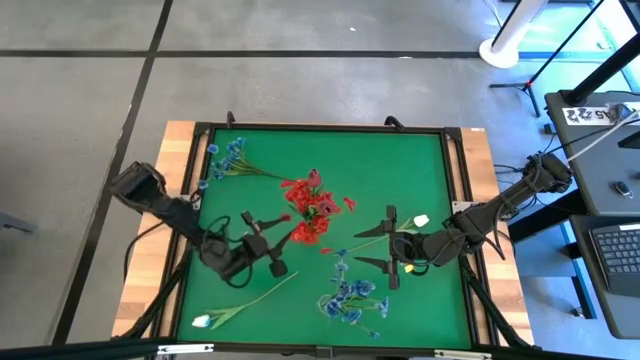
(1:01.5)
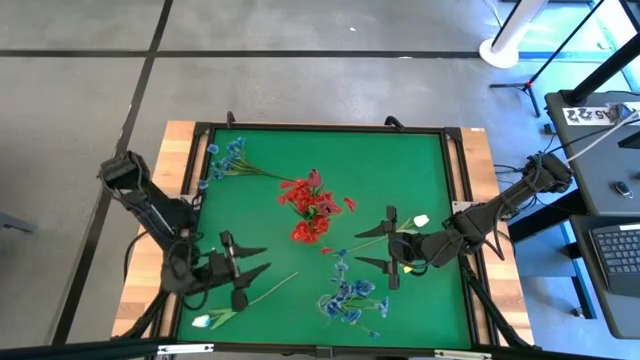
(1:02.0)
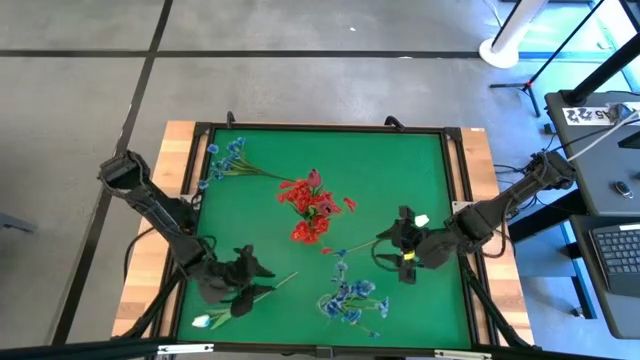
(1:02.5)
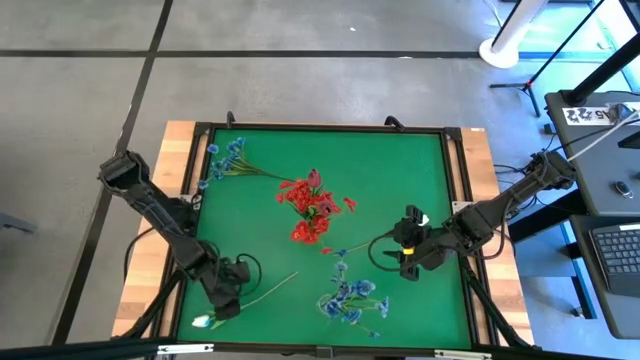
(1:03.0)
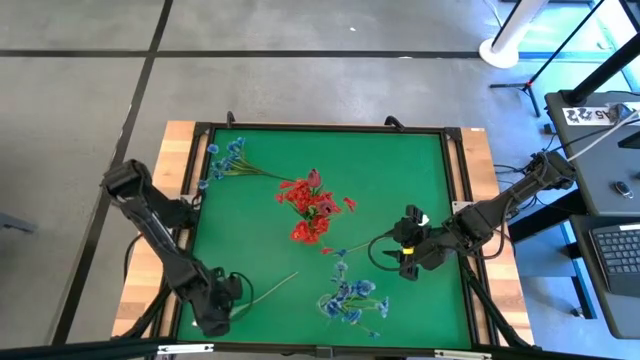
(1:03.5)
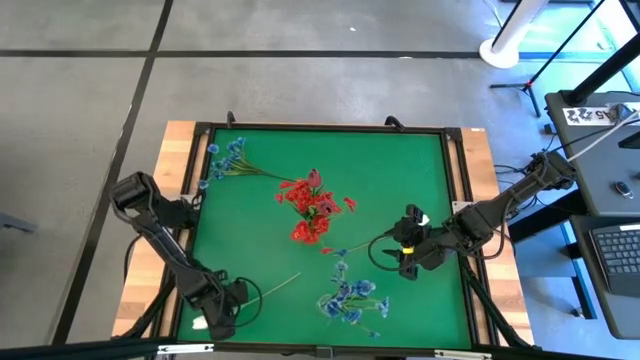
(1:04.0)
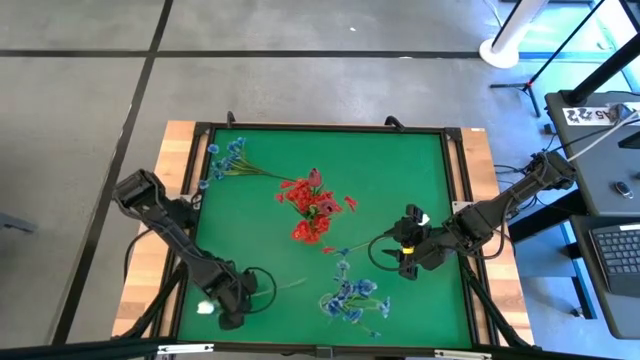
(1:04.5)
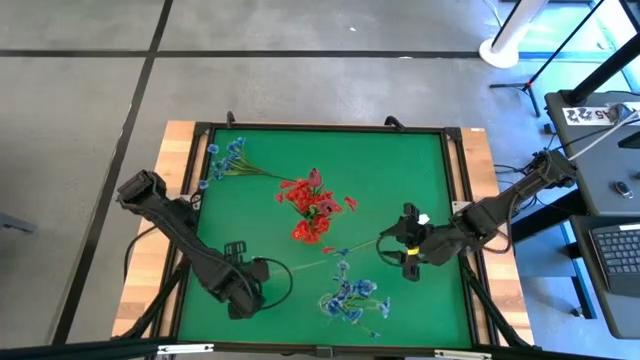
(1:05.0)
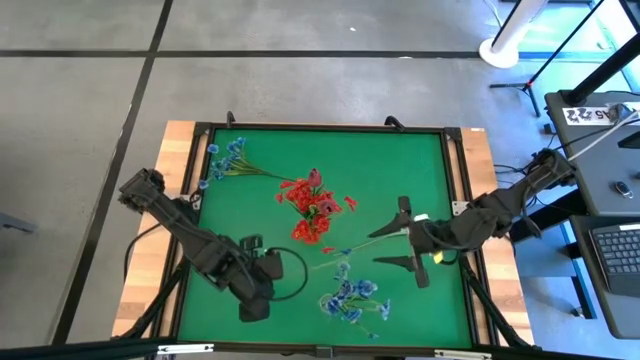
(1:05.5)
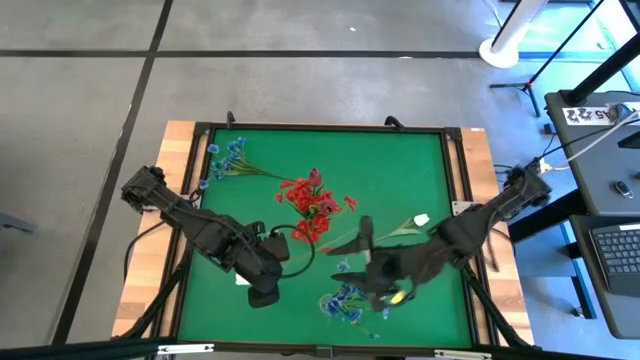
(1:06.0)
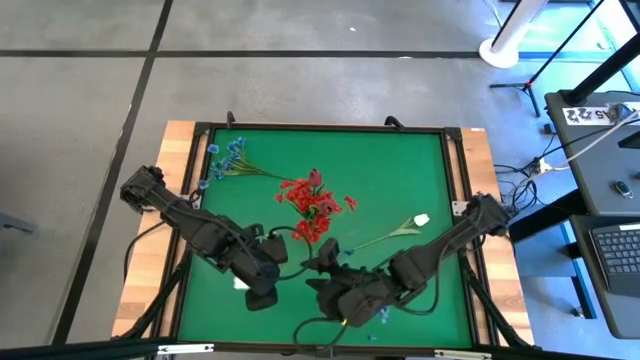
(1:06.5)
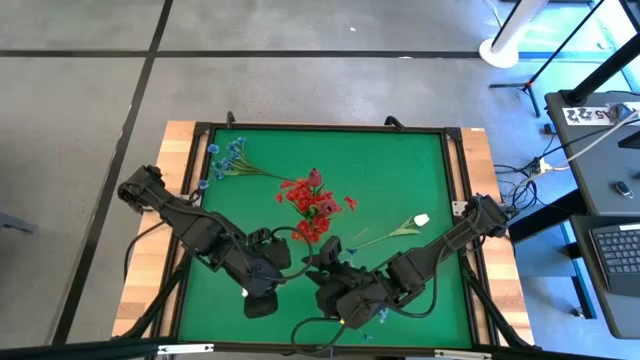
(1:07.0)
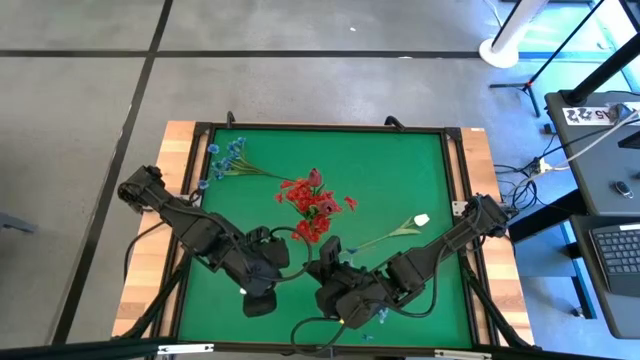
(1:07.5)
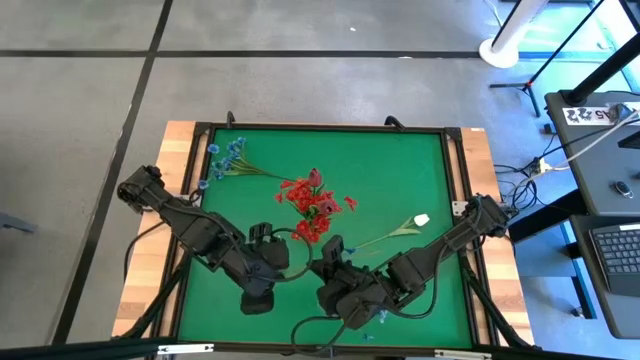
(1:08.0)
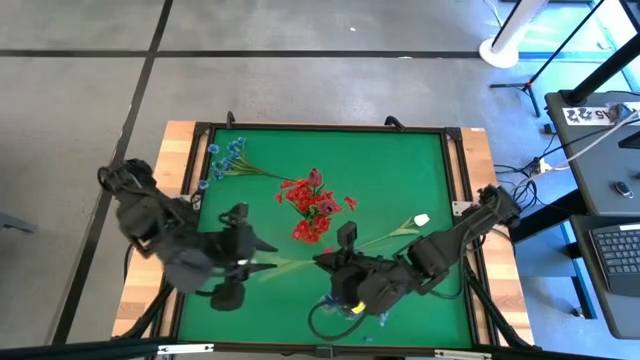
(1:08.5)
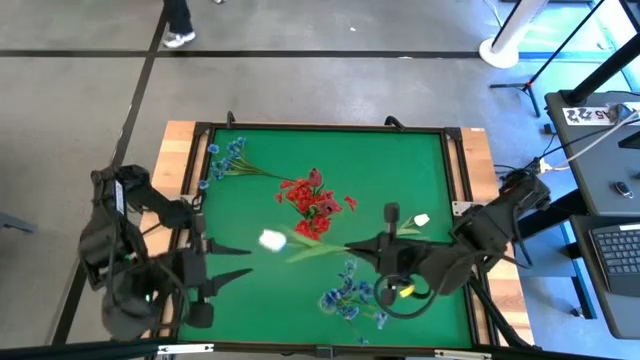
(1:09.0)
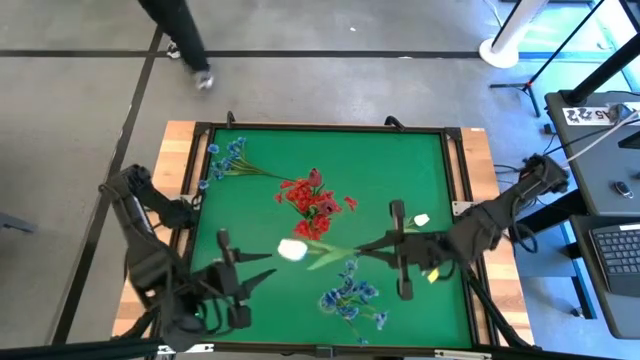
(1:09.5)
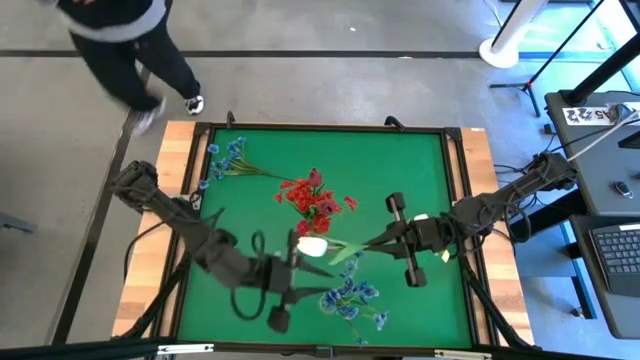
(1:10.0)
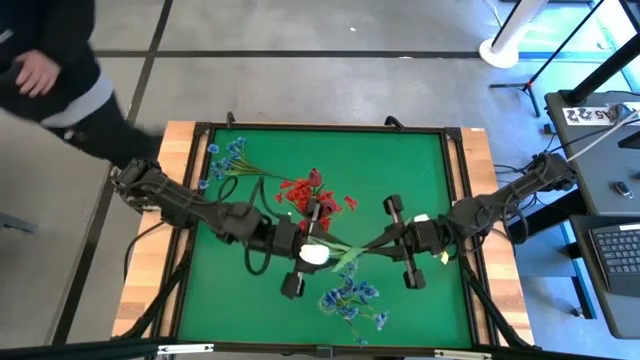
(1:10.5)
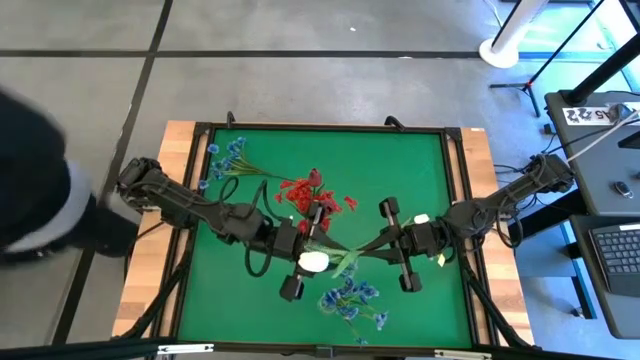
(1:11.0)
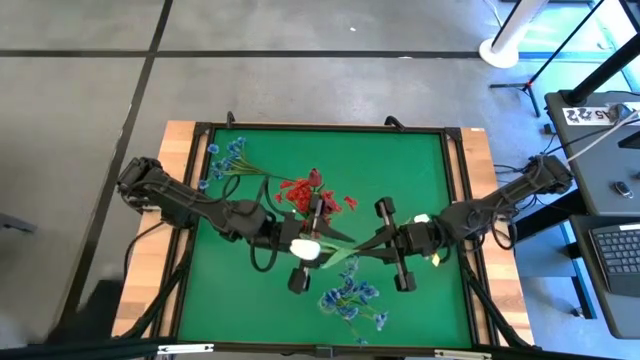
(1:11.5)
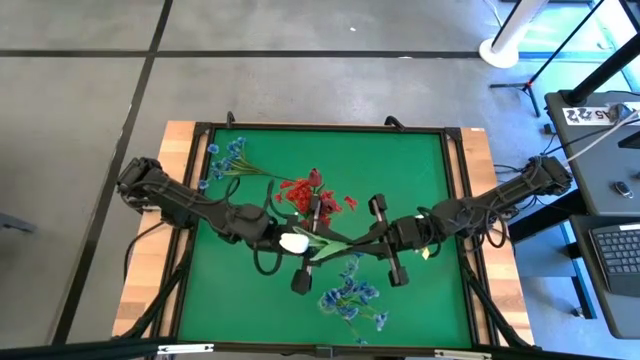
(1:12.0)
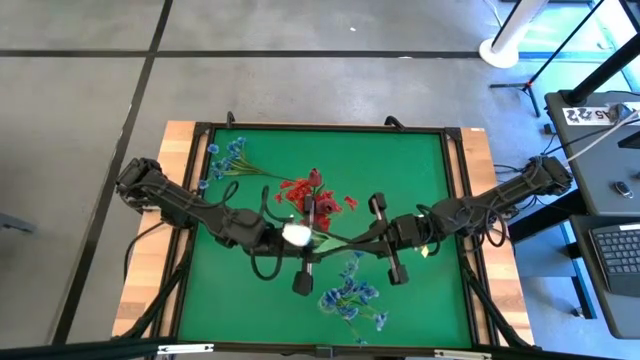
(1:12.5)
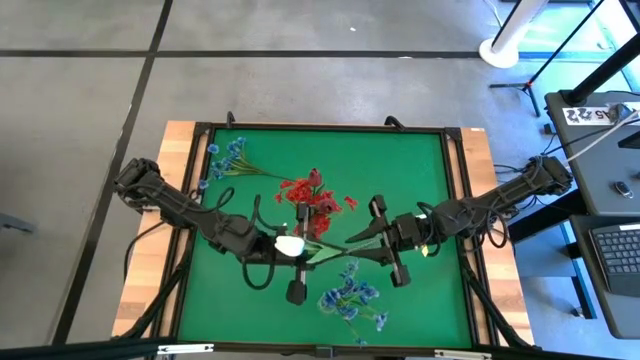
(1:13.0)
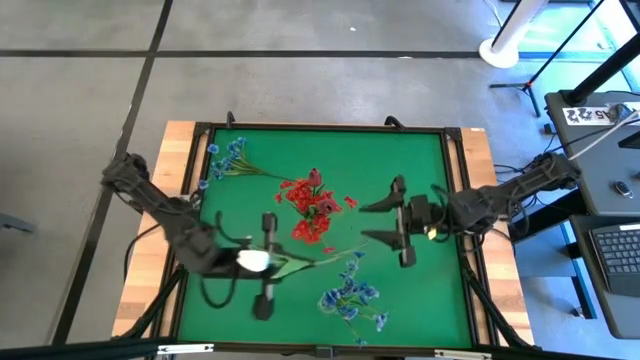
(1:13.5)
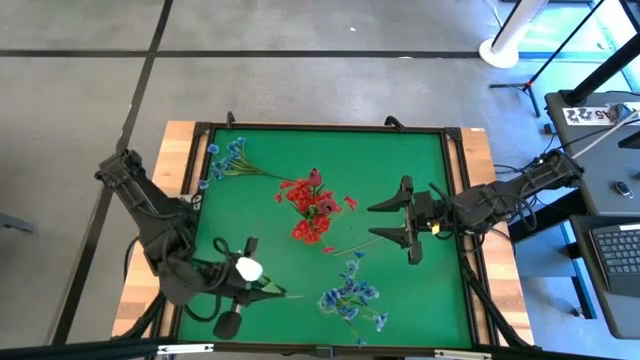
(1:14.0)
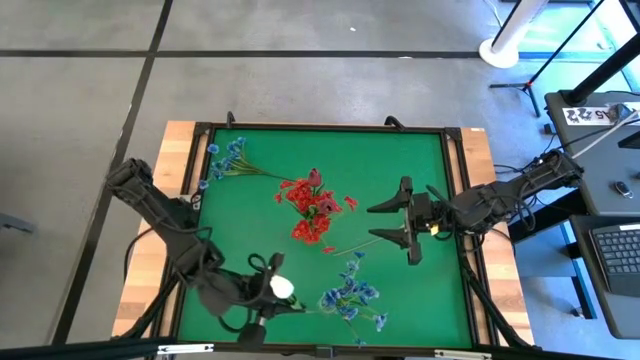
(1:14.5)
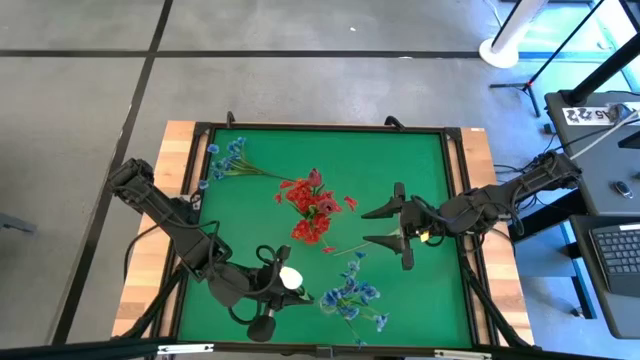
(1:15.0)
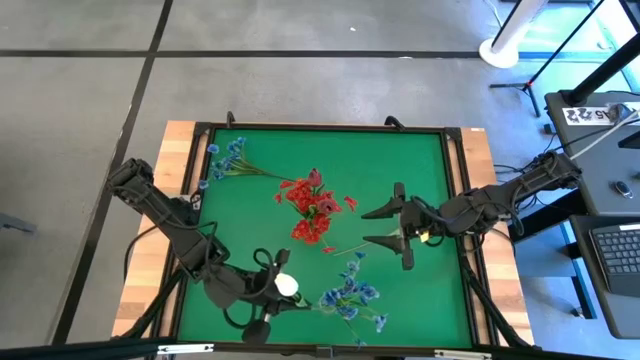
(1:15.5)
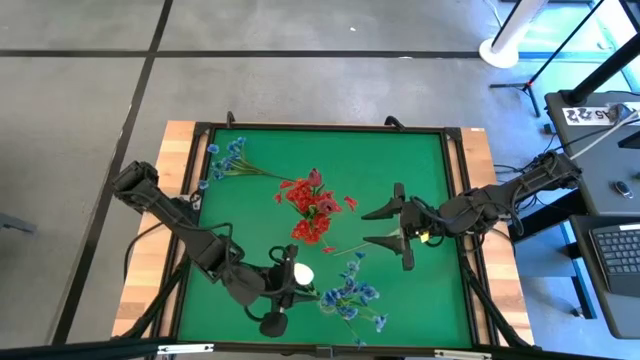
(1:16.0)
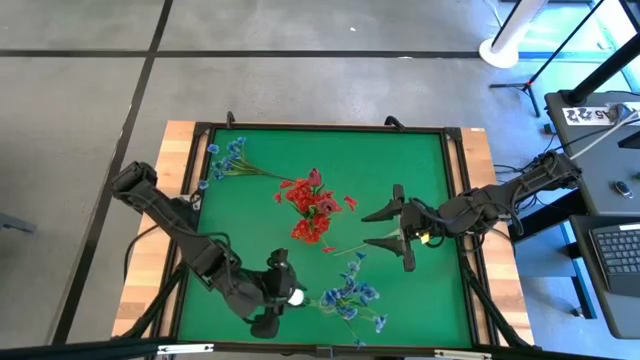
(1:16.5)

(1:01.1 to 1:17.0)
Task: Sort flowers into vase by color
Put the left white tulip into the transparent vase
